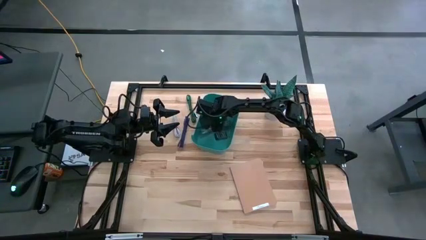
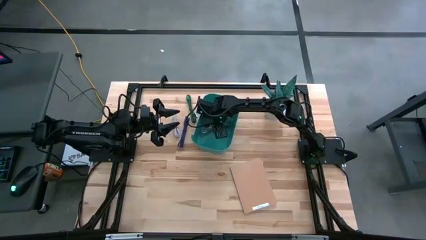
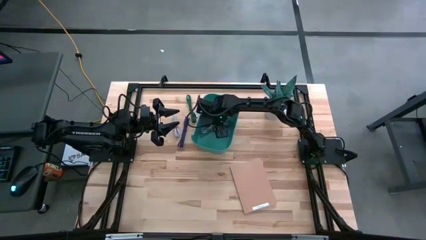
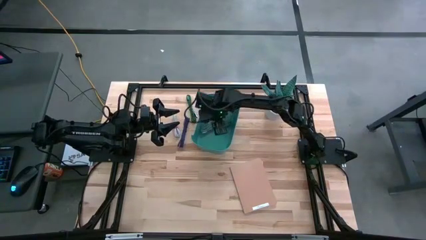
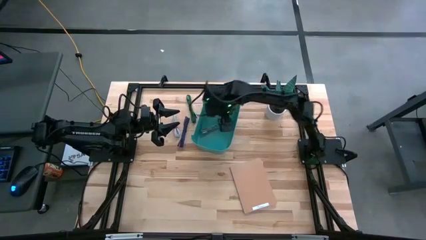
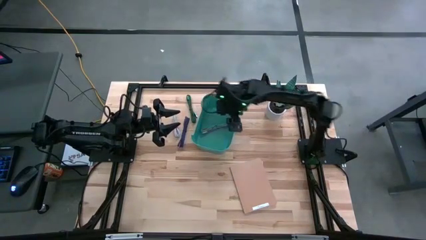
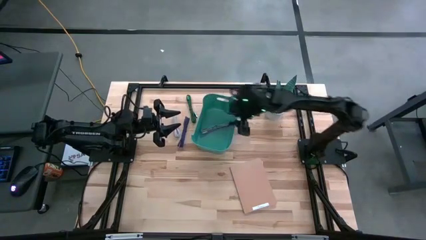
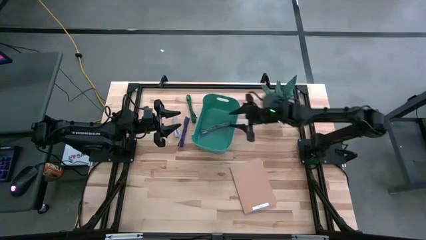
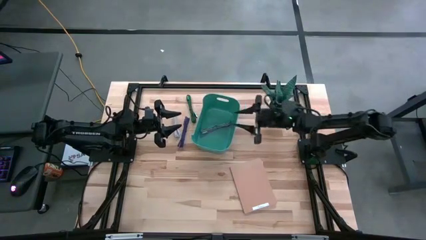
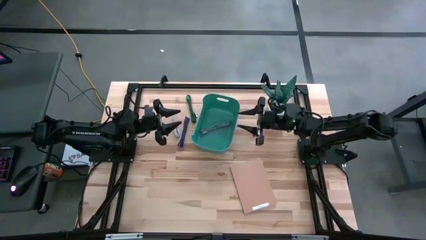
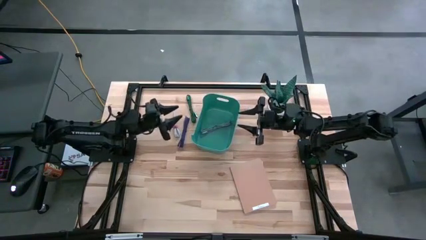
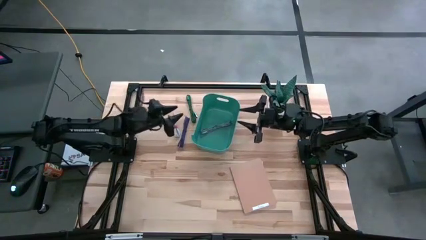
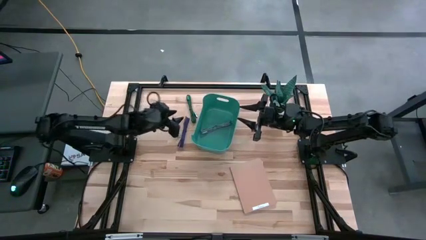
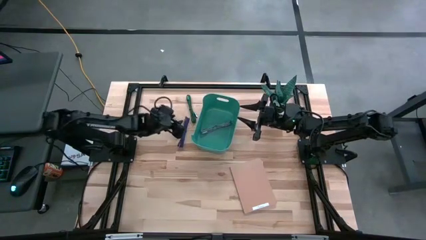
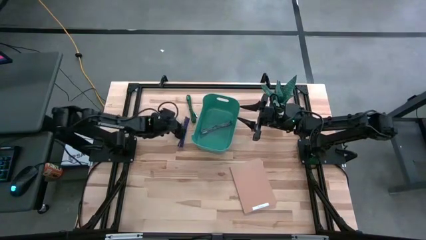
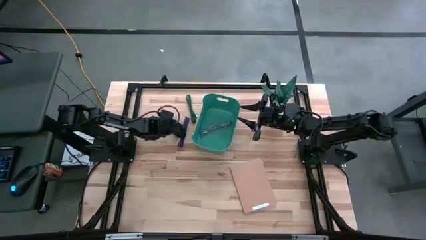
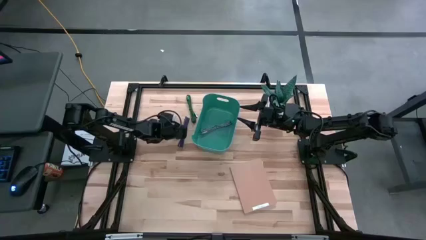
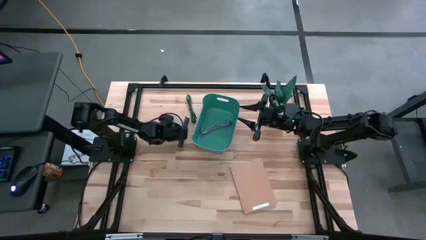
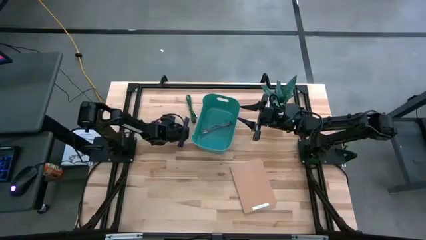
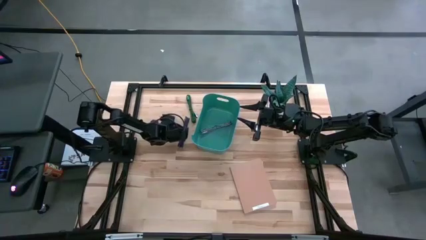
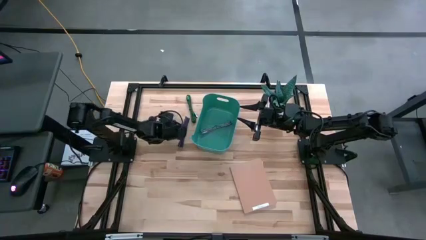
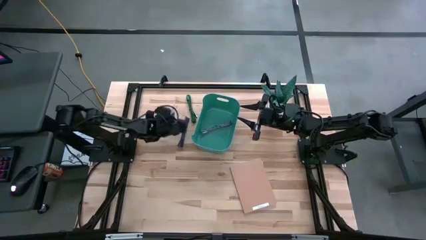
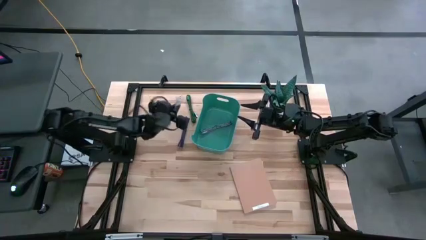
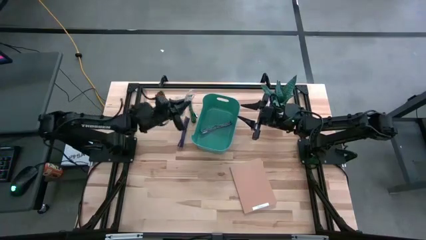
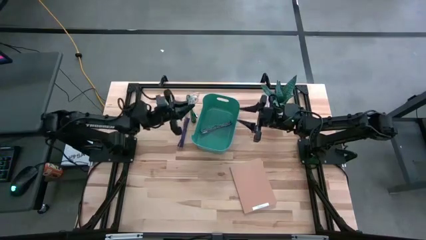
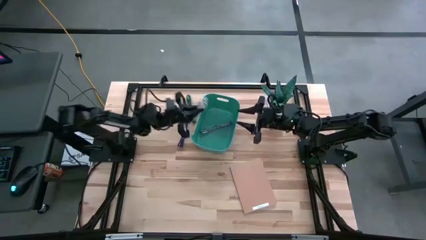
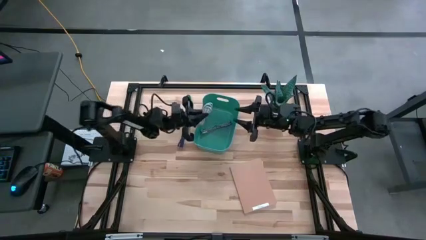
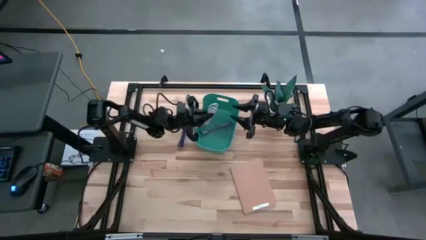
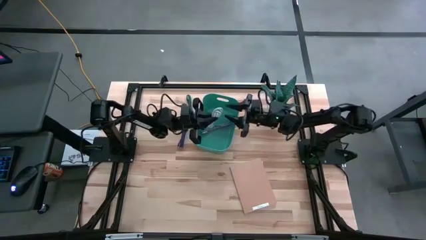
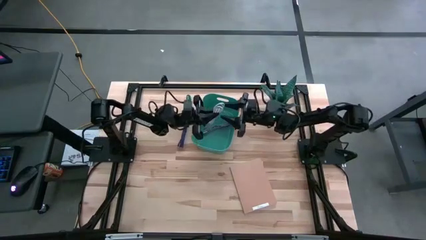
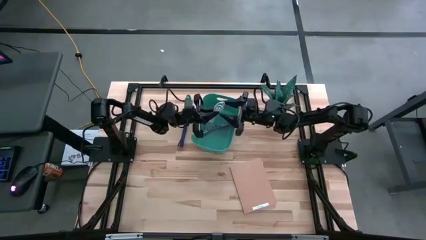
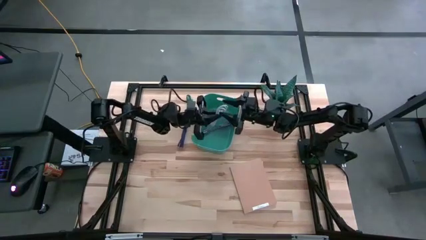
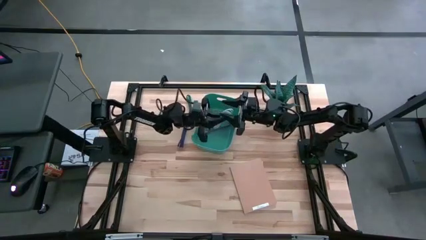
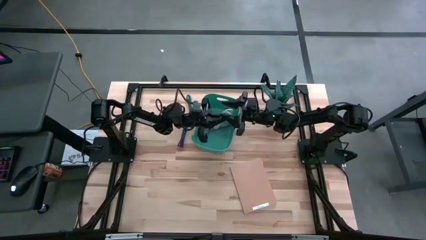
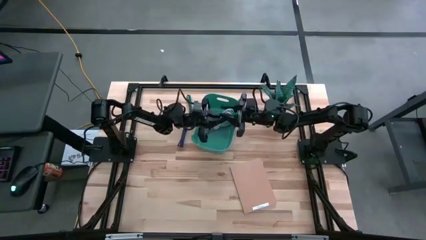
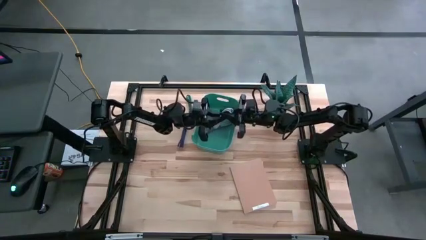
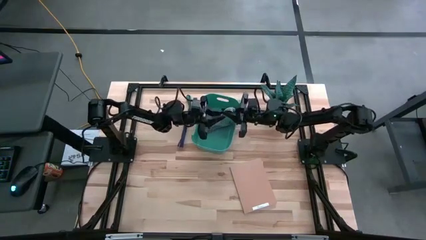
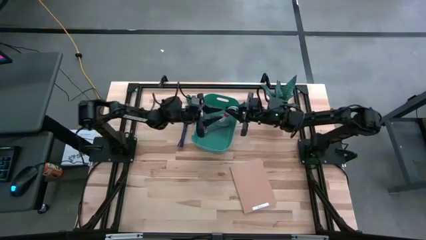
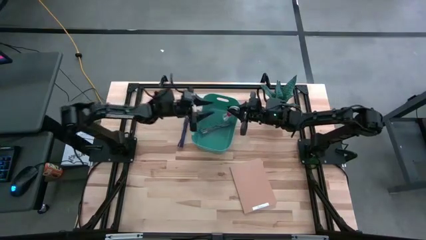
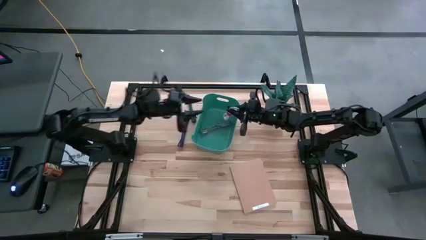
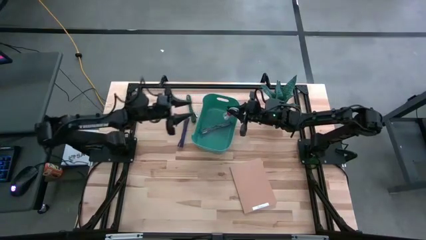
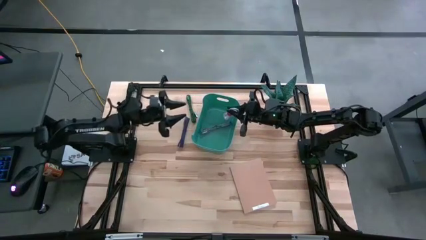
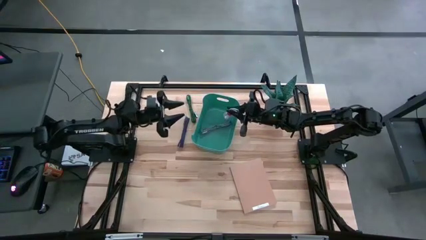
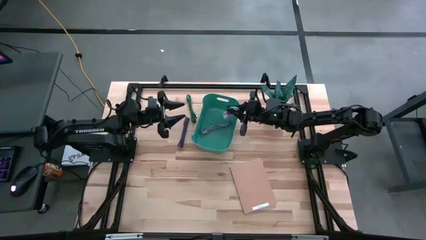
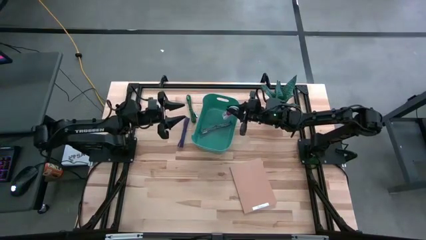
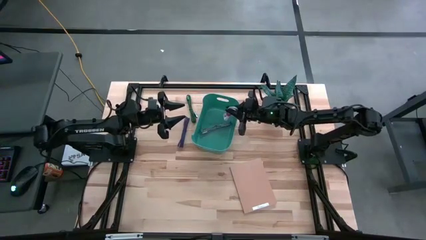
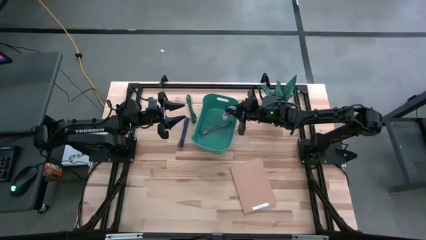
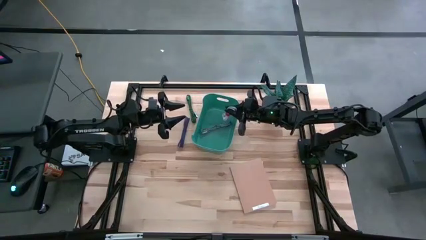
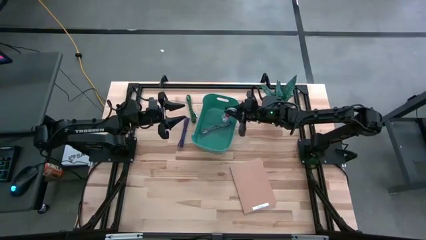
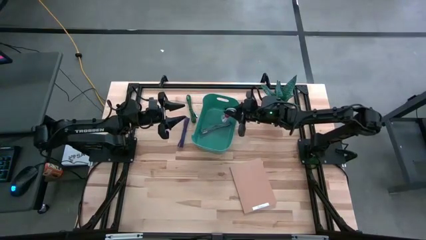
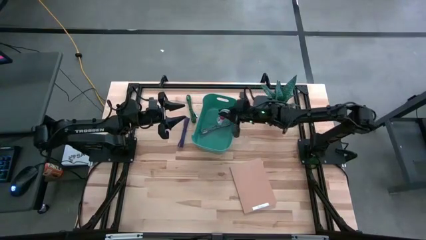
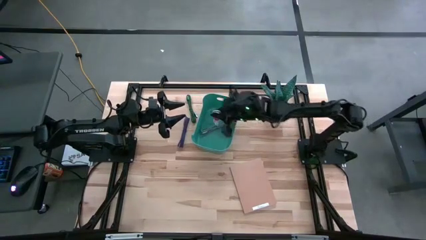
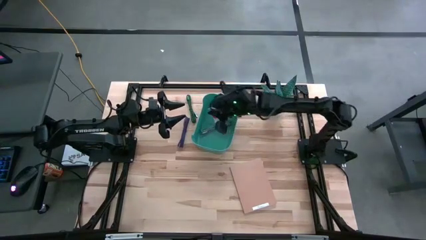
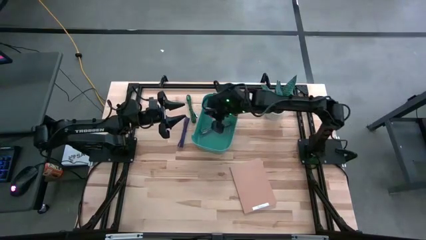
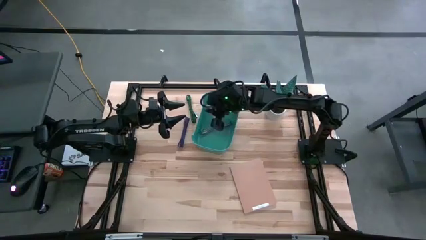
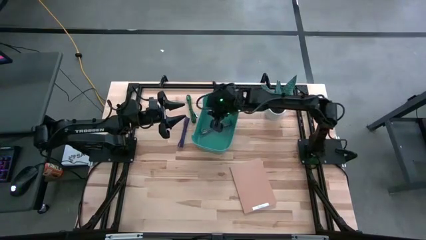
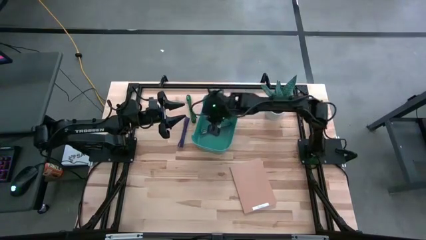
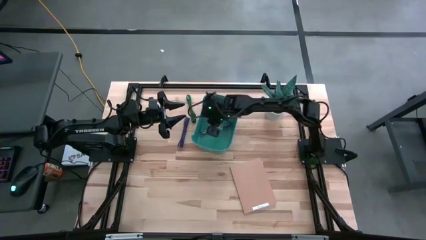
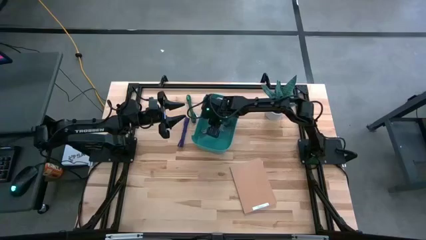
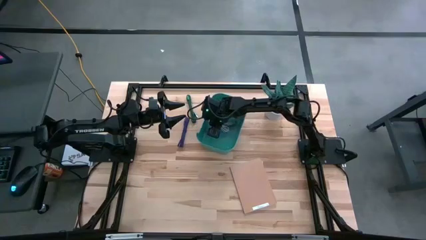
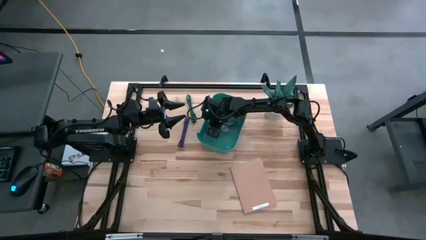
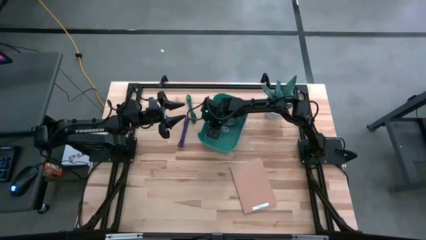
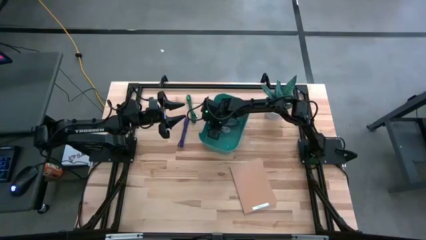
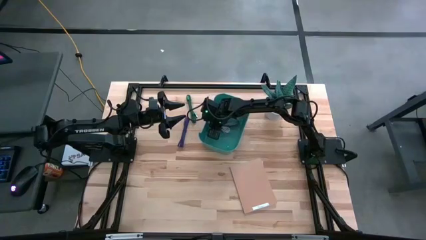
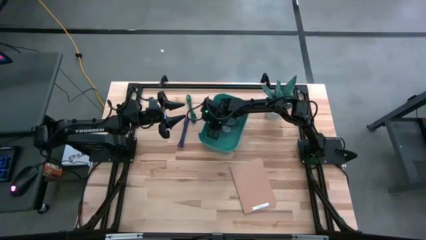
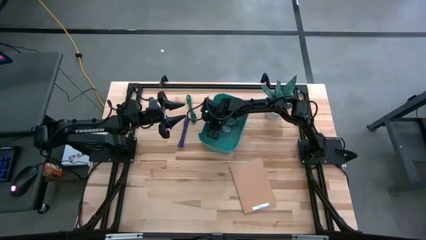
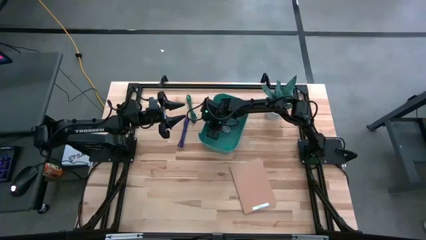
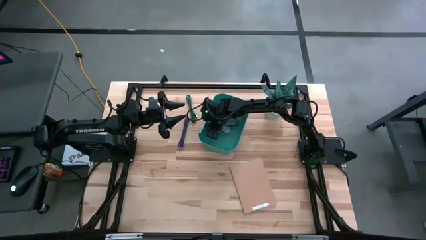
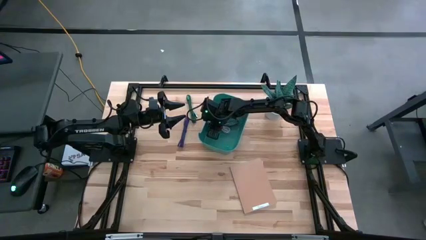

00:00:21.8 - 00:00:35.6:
Task: Pick and place USB-C Cables
Put the white charger cable into the green bin
